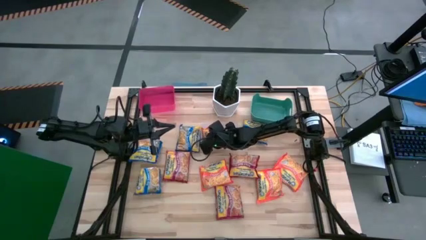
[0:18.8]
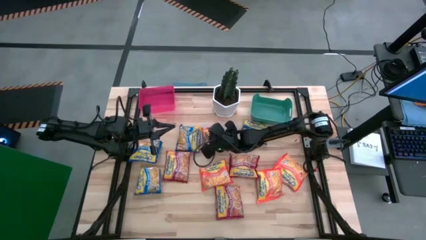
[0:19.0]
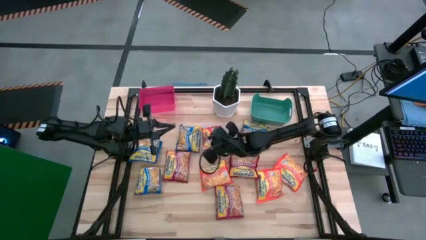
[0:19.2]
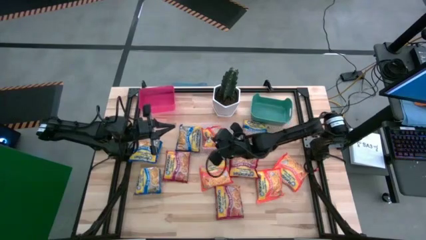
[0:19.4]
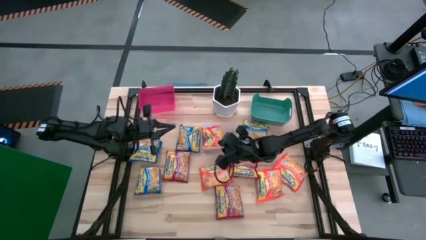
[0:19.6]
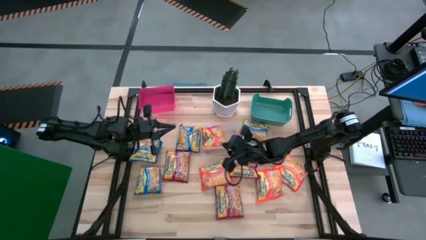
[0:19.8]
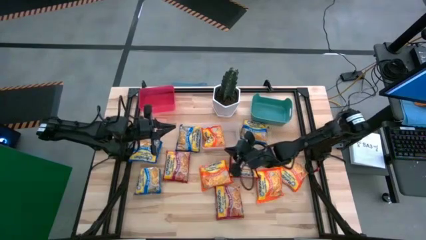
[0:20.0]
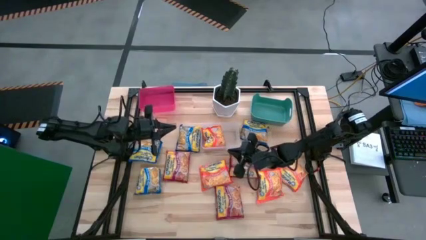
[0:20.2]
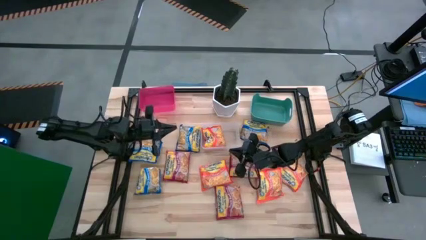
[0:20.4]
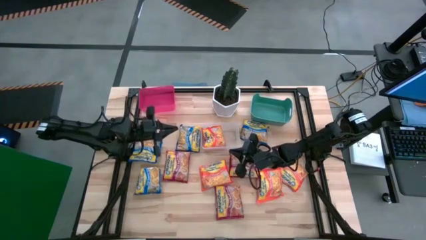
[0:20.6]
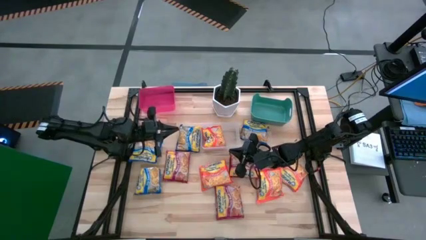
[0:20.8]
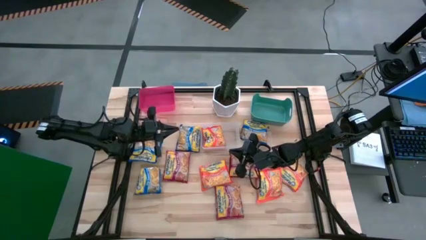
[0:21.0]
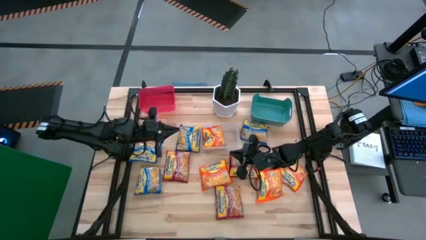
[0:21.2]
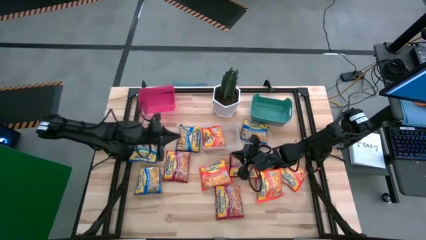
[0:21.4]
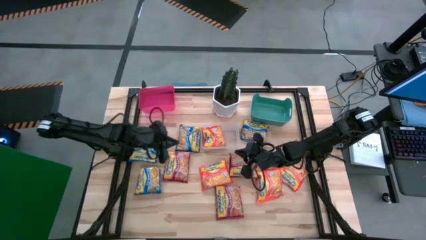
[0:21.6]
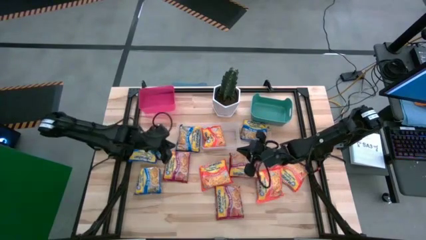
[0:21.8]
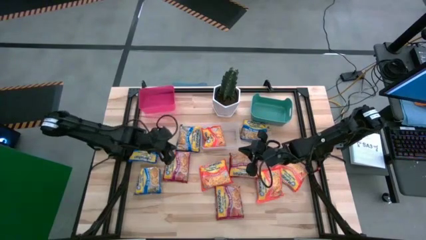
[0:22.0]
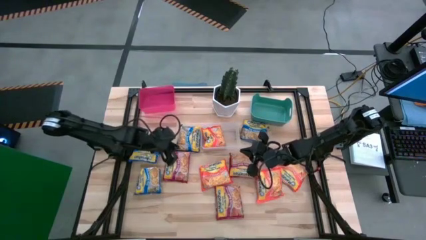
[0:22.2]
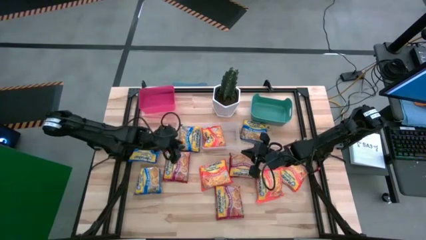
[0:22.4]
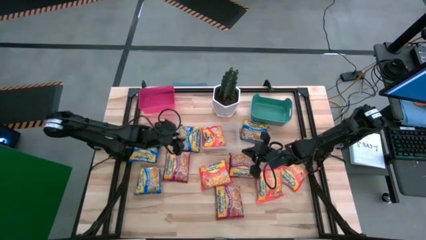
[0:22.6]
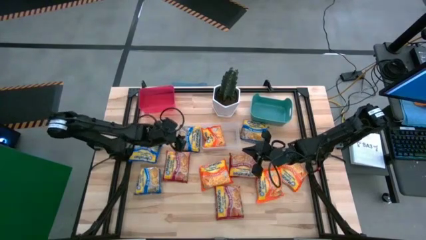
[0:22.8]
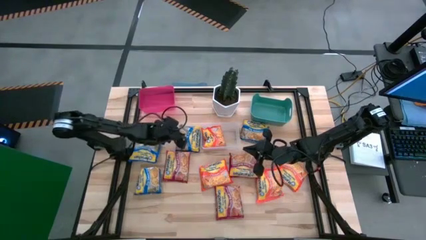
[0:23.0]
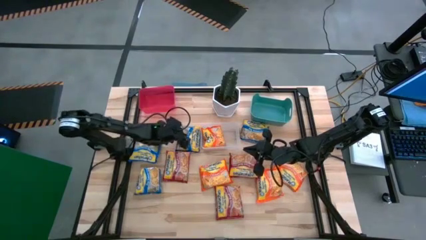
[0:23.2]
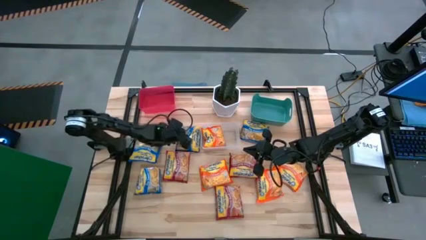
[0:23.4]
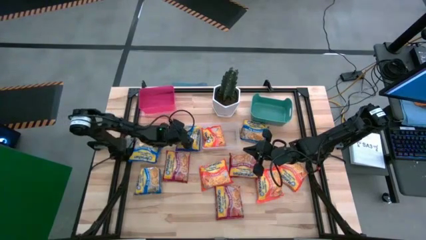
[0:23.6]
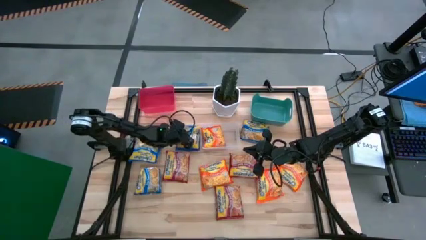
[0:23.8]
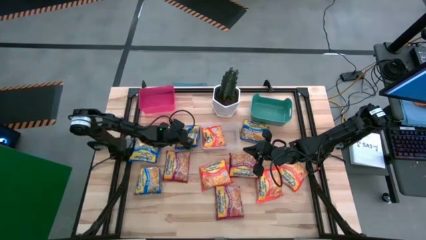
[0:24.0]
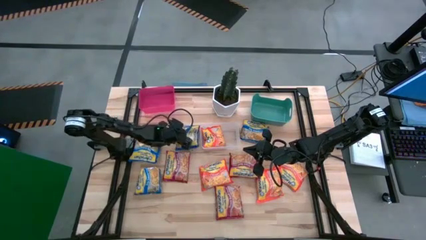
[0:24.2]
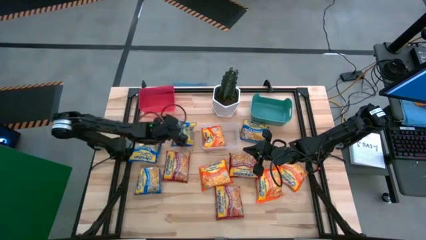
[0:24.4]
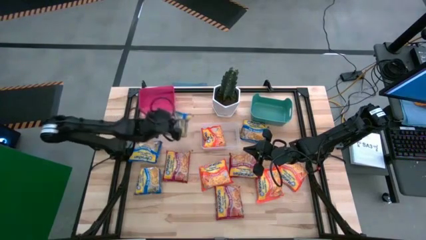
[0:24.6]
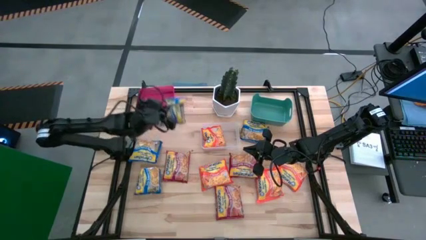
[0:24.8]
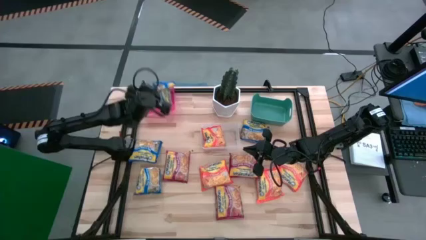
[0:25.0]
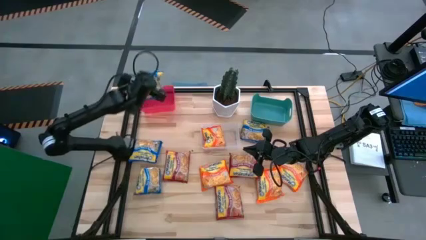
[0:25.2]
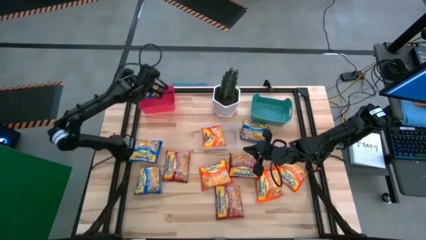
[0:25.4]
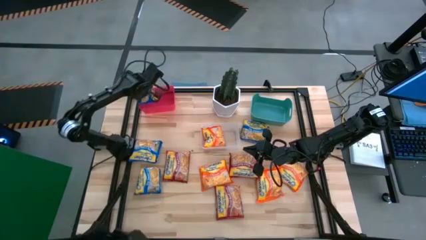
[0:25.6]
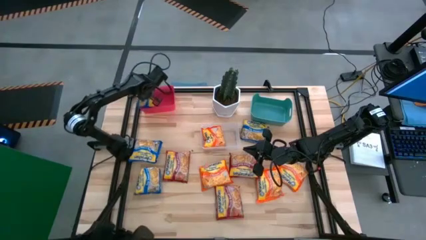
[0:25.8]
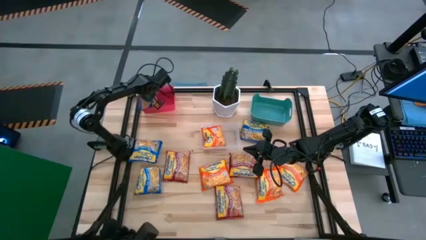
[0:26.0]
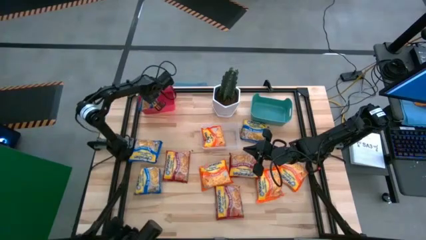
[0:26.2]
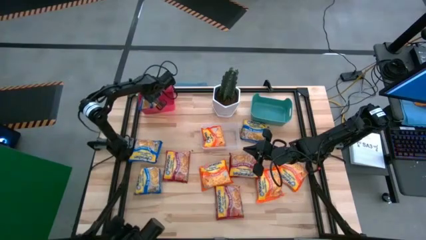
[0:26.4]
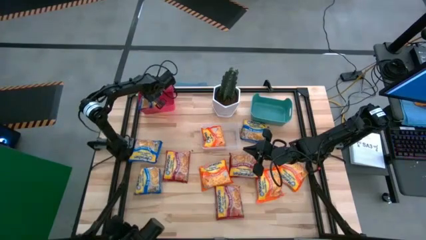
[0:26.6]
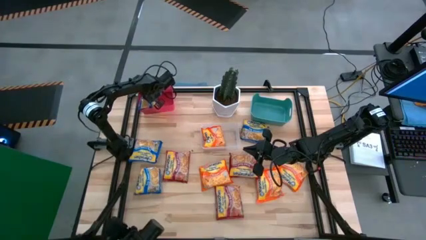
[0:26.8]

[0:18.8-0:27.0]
Task: Sort Maruchan noodles
Put the blue noodle pack into the red bin

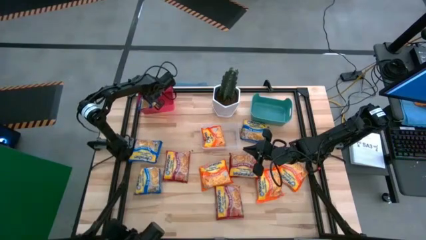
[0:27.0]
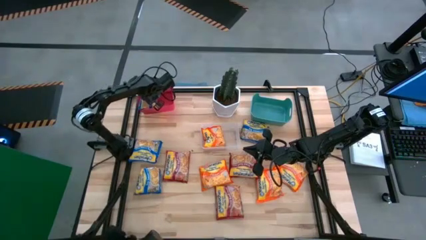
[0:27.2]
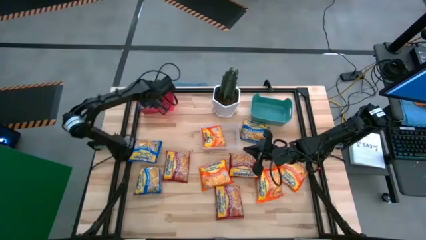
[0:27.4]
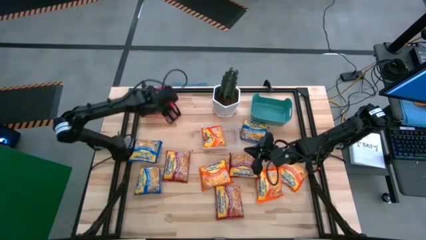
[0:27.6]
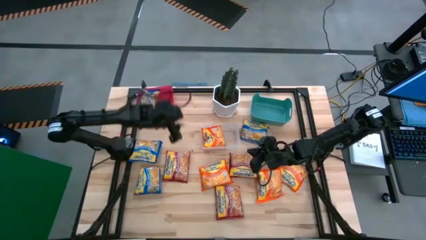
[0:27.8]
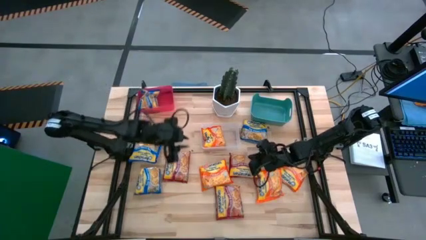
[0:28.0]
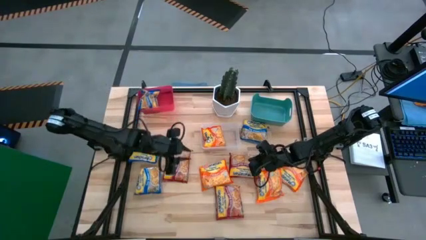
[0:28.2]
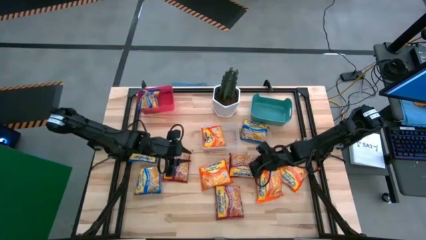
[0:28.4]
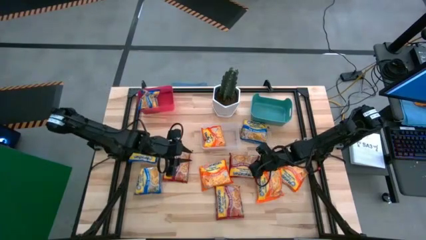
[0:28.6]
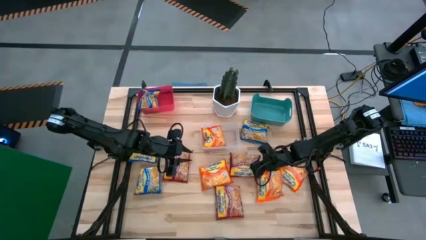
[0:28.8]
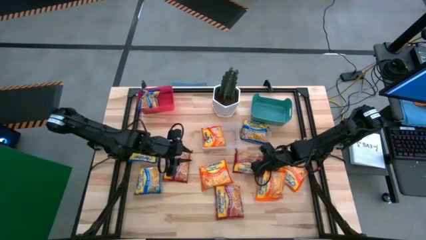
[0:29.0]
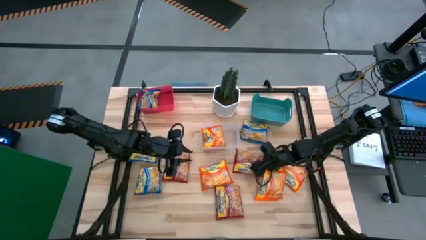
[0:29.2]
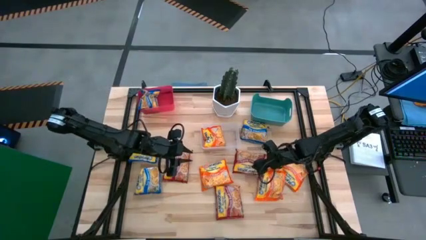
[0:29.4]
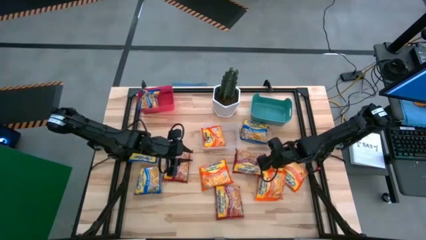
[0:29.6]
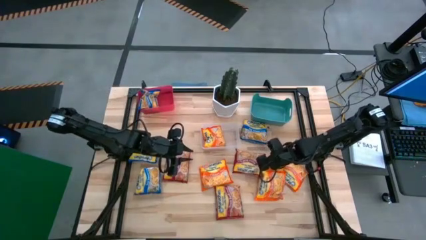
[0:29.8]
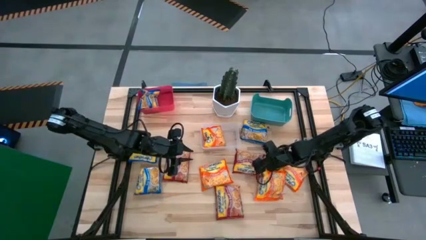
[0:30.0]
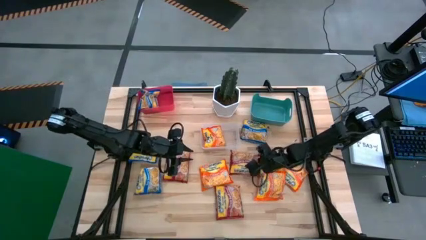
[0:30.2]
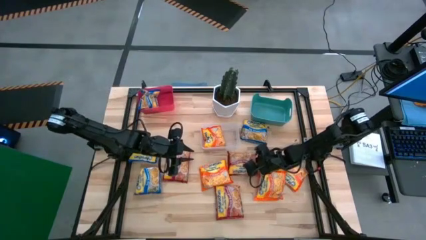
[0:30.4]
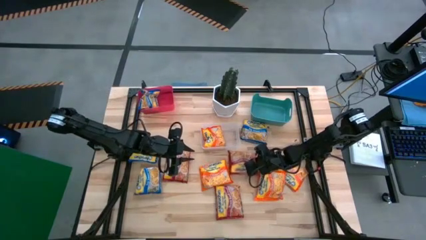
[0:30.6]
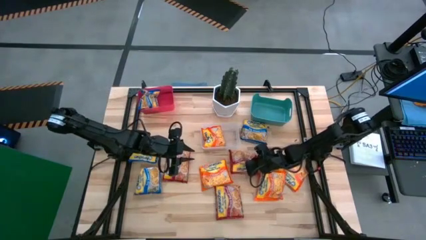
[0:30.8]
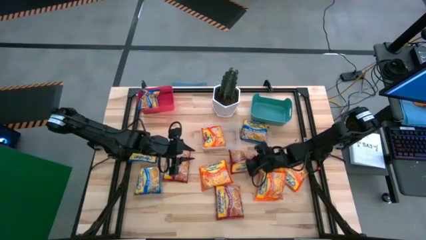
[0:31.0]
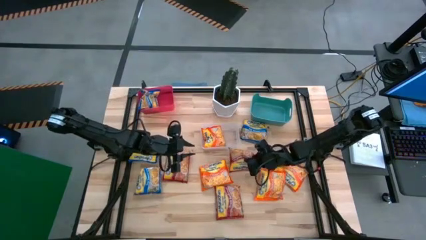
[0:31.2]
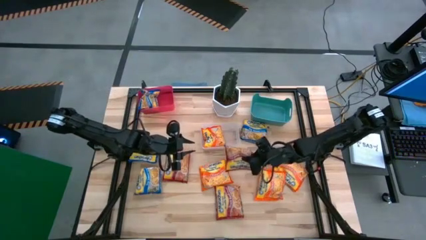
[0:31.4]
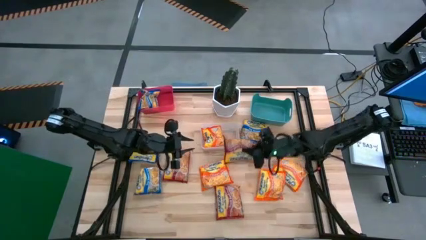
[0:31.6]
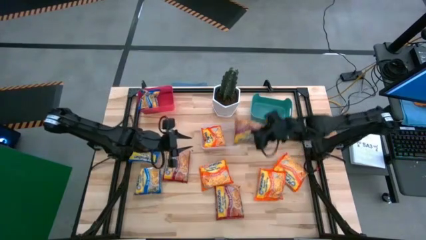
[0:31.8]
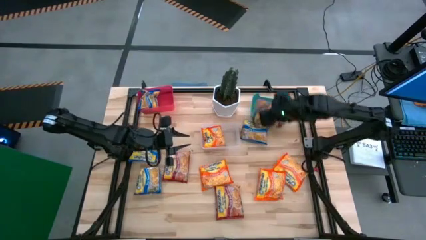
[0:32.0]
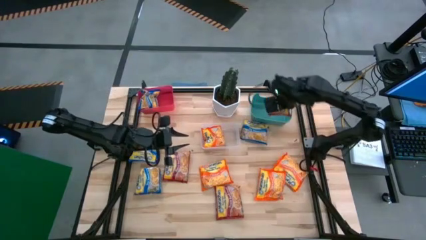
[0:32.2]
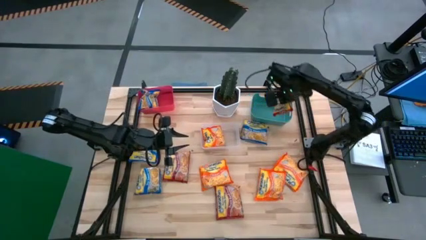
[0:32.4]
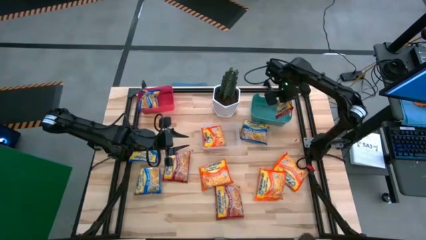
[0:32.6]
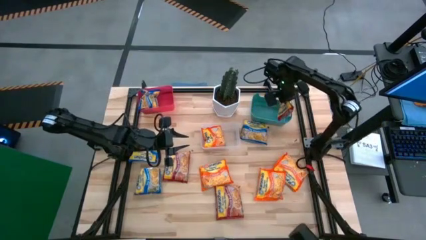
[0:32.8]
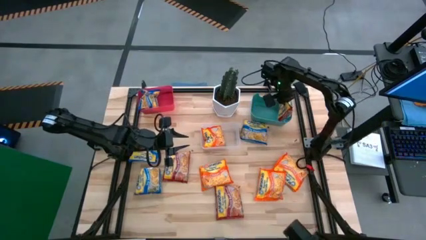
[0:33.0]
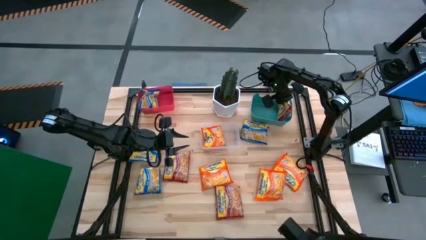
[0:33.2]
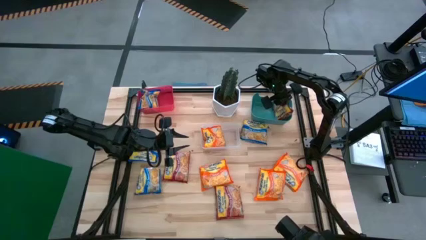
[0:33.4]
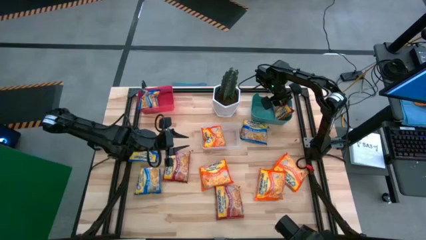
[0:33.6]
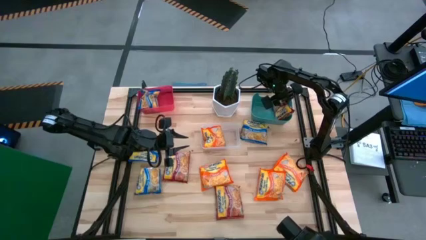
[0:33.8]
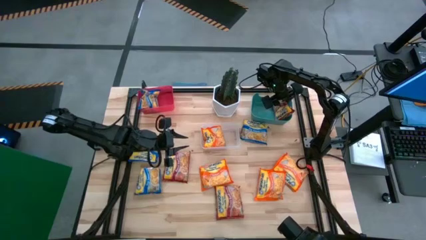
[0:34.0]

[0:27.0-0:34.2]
Put the red noodle pack into the green bin

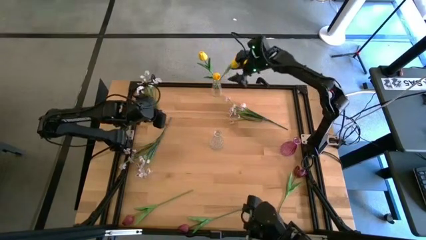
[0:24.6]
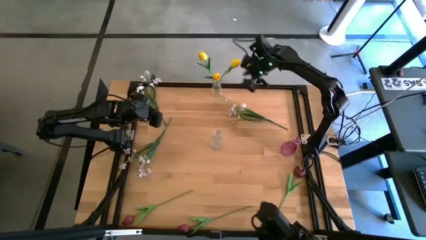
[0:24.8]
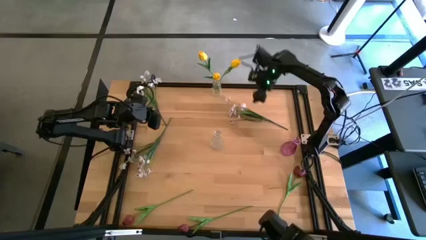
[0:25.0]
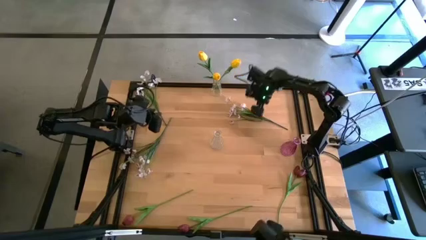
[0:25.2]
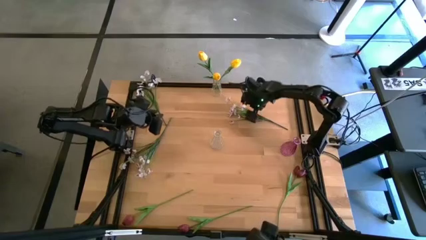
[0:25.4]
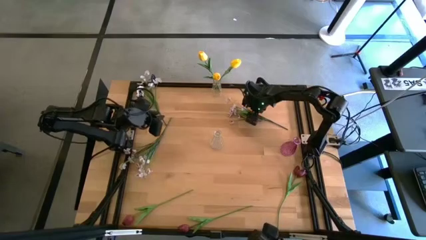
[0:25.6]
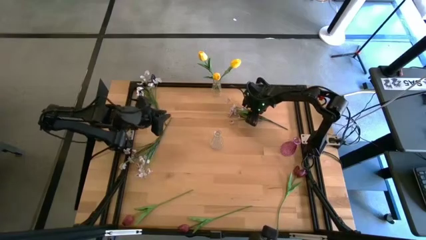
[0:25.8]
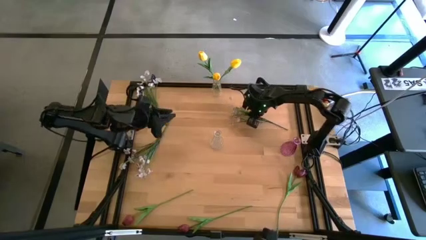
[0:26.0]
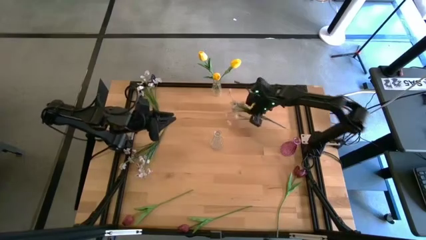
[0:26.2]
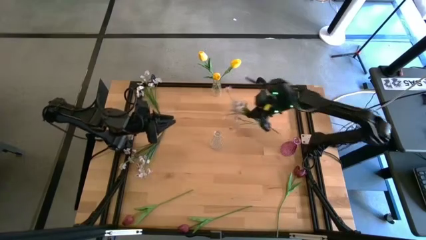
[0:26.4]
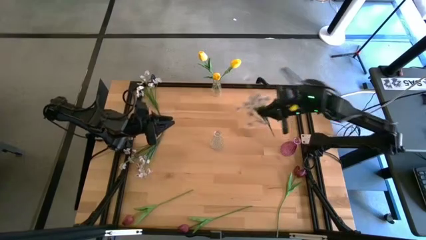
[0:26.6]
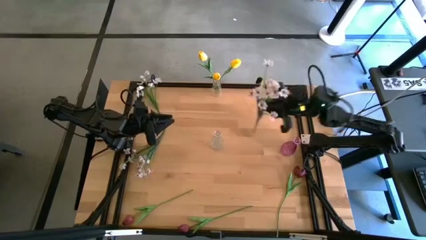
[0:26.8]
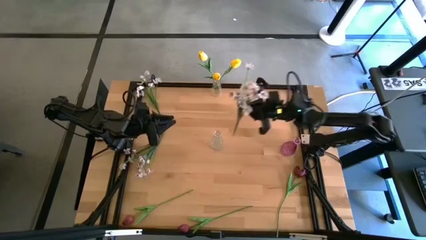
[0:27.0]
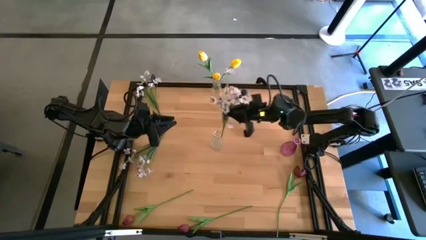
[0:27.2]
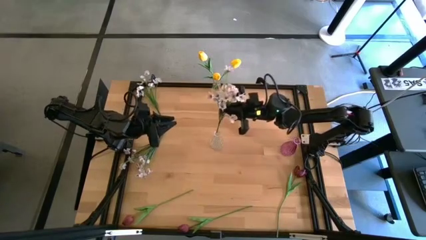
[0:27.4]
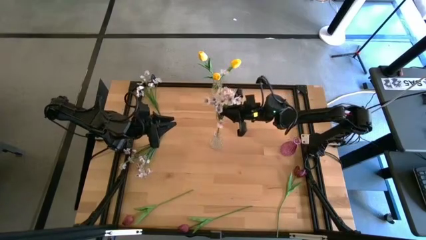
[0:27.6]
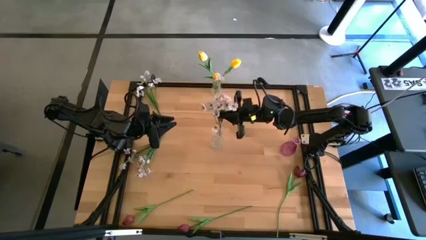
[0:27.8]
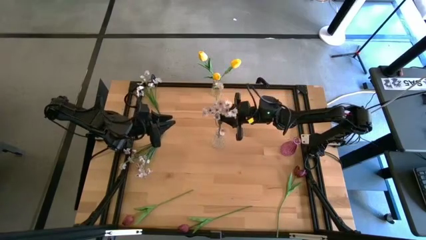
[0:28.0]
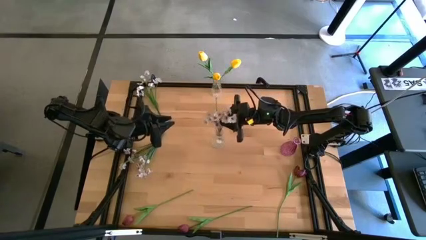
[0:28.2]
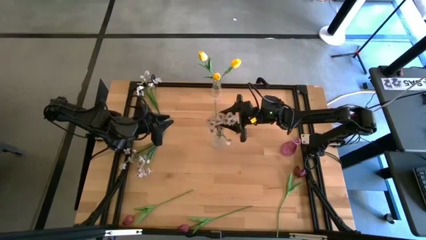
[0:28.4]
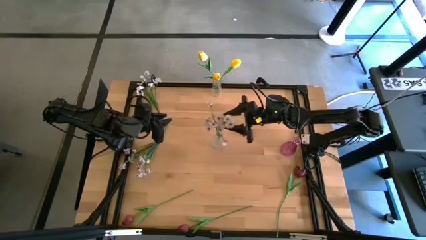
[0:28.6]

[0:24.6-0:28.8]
Task: Sort flowers into vase by color
Put the middle white flower into the bottom vase
